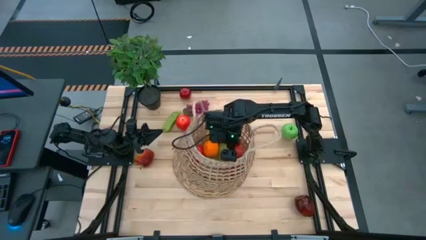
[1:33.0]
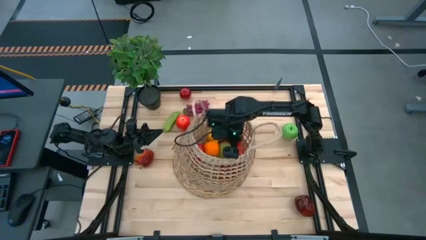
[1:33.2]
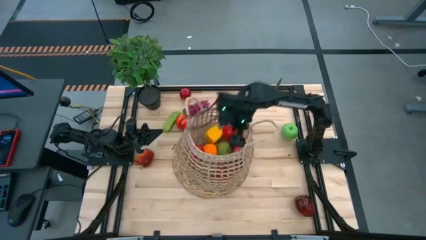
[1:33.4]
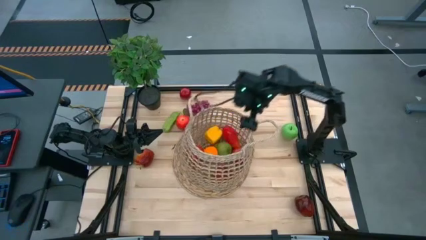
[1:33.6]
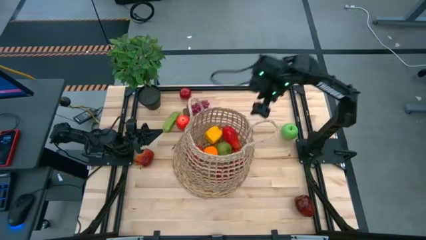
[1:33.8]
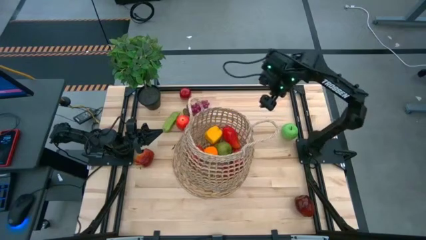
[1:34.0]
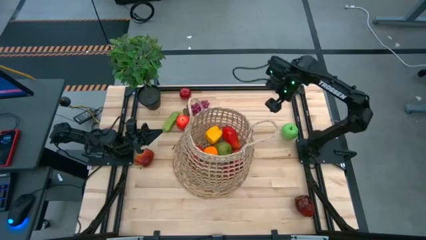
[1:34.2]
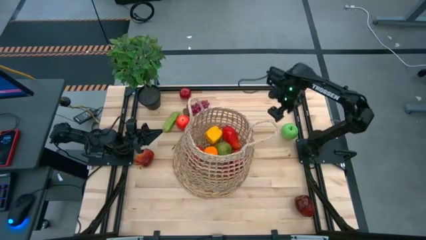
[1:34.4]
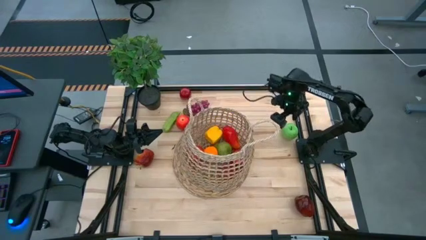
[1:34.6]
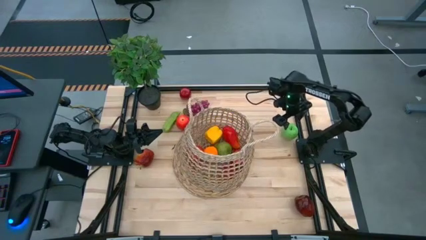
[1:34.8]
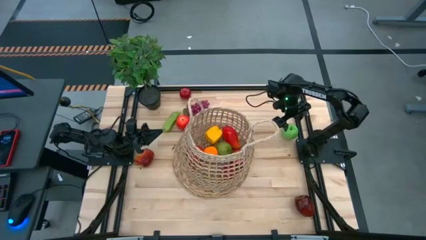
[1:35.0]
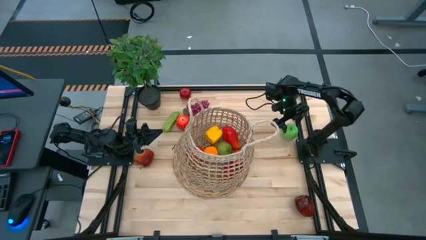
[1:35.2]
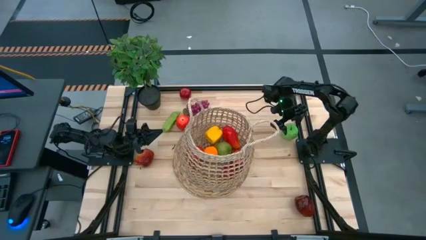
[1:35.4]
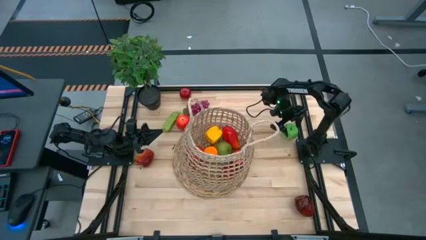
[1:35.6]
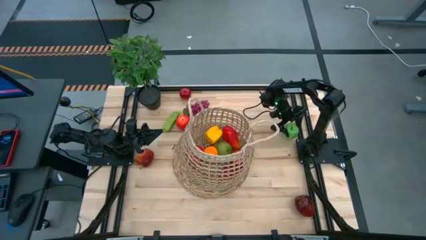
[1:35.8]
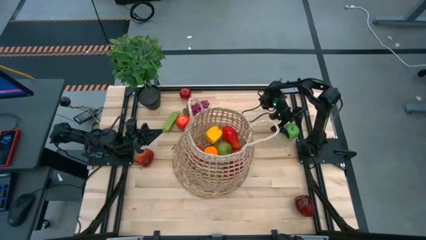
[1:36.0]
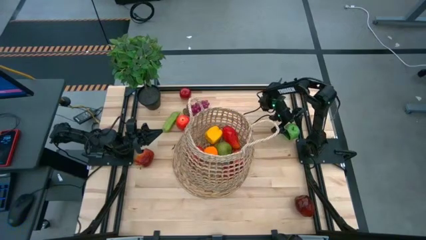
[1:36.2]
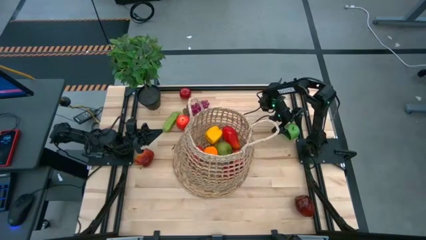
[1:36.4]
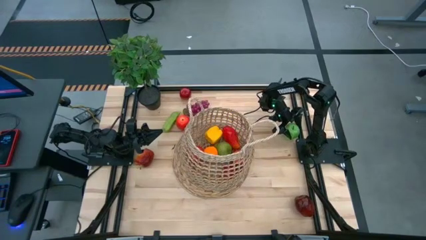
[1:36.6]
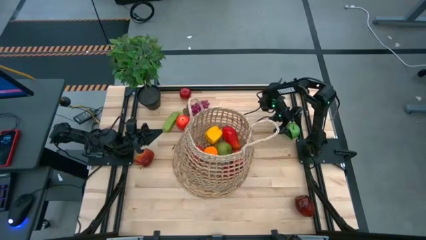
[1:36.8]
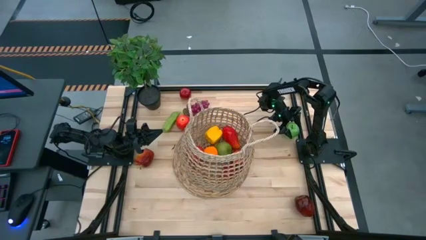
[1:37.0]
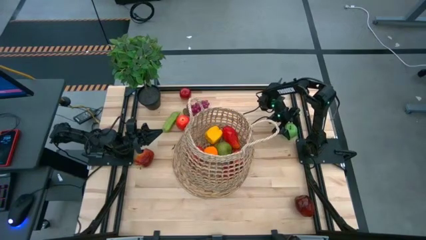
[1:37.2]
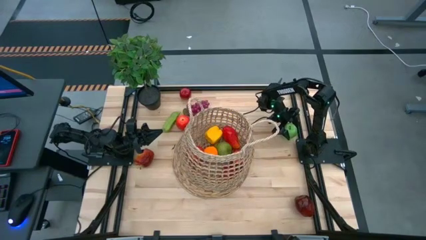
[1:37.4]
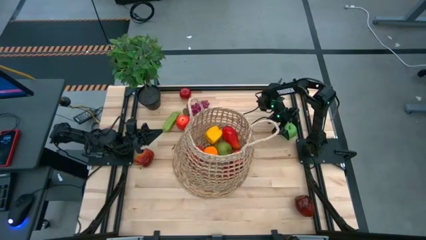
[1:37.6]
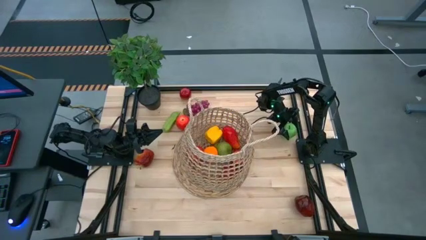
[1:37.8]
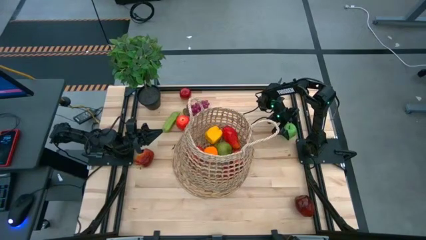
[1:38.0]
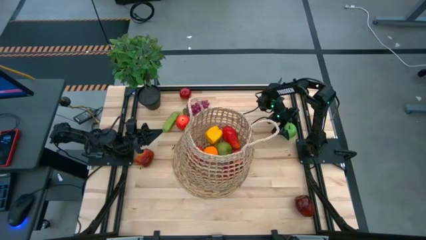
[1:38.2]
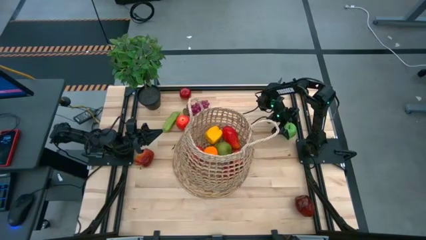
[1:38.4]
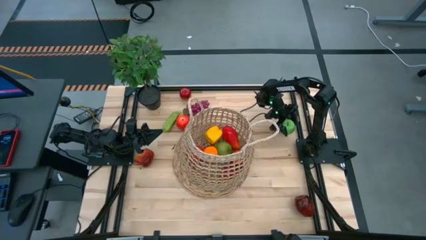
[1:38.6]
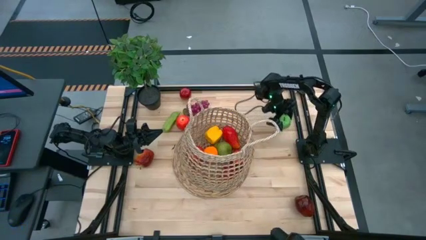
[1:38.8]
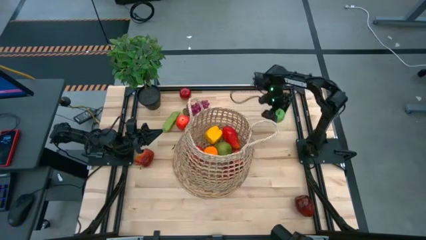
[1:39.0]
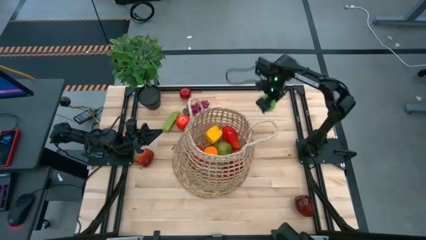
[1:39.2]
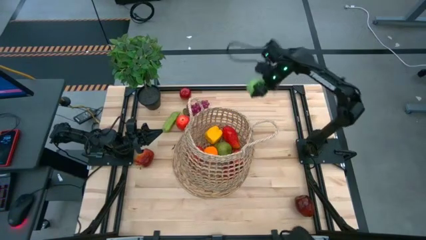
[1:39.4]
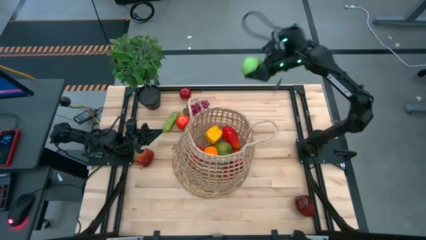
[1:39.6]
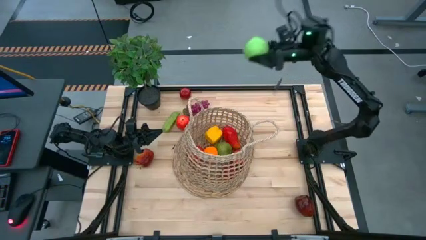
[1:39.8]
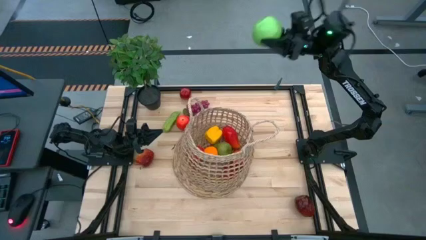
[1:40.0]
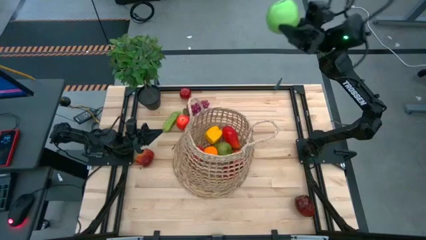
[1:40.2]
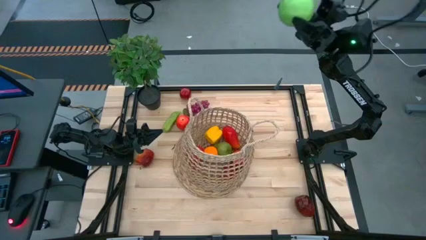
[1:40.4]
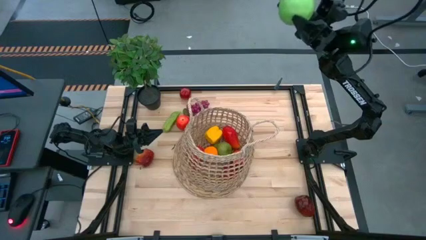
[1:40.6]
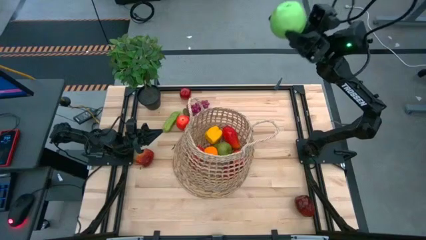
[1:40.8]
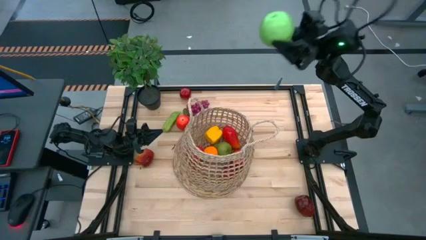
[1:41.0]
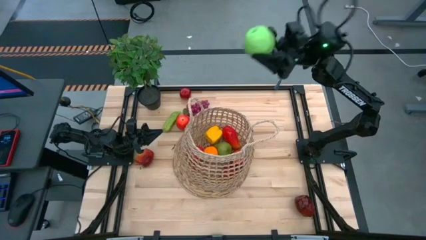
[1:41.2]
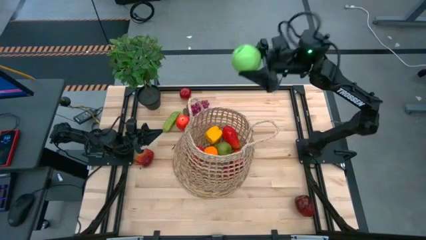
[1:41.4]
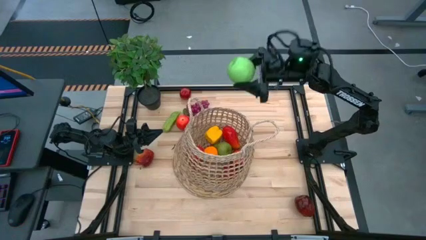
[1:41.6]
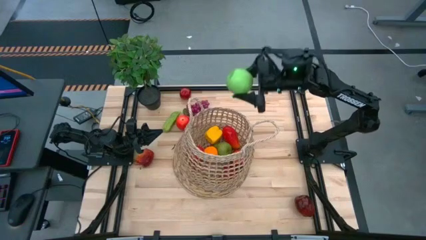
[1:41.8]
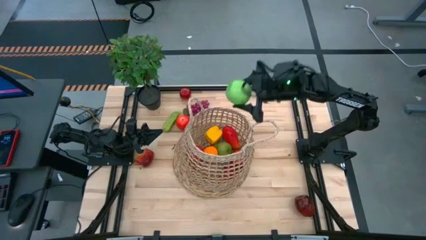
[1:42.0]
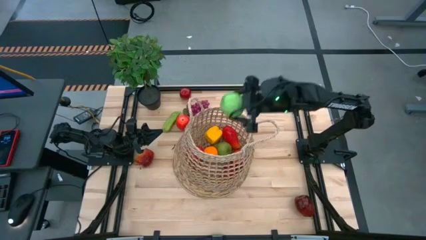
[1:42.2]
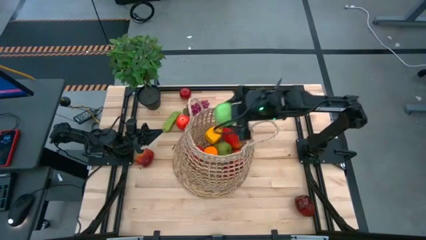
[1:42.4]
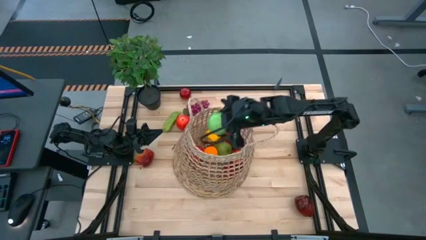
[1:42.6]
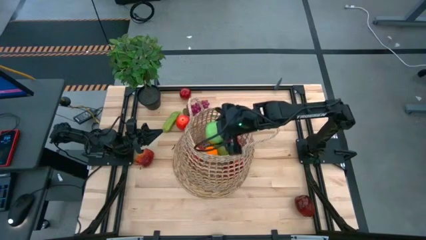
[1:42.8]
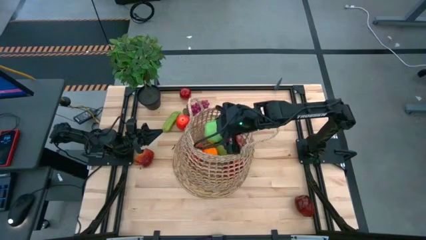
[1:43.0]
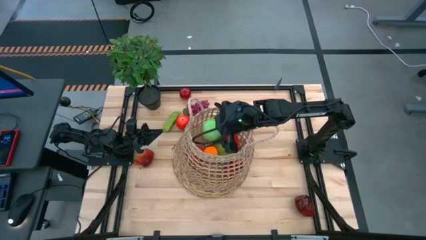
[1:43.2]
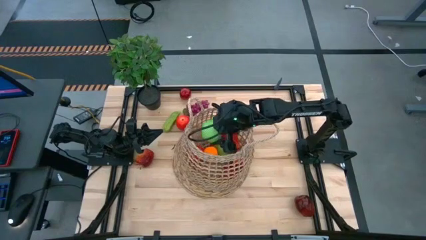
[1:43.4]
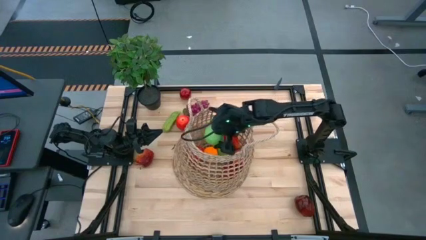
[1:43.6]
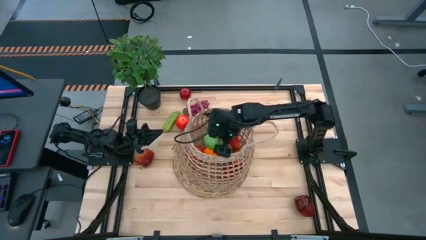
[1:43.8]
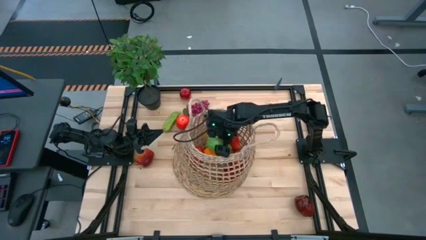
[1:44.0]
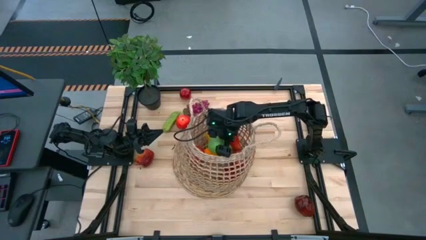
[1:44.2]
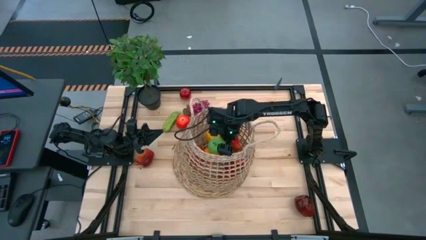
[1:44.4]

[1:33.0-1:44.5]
Task: Build produce basket
Put the green apple into the brown basket

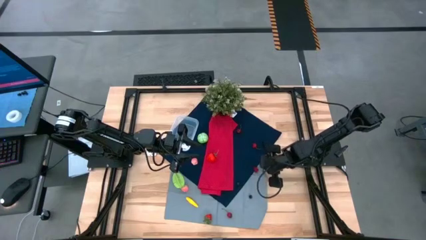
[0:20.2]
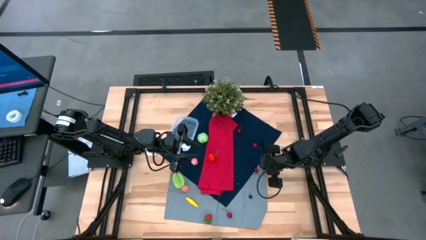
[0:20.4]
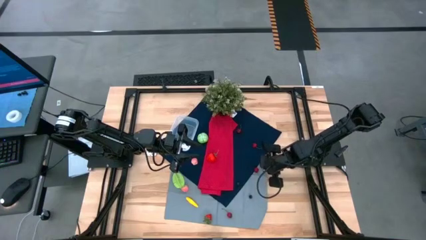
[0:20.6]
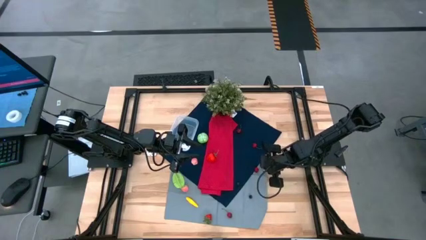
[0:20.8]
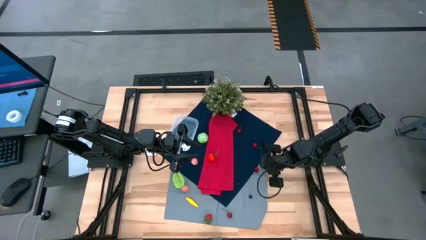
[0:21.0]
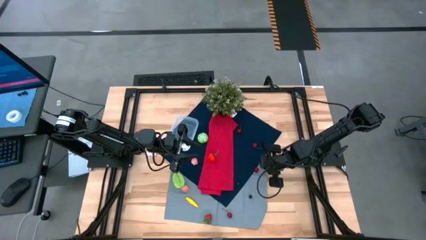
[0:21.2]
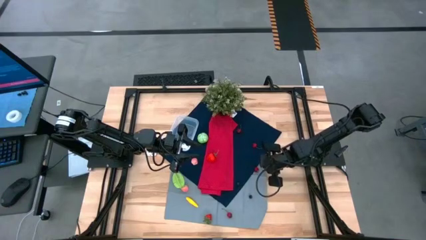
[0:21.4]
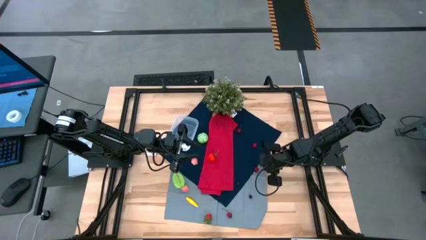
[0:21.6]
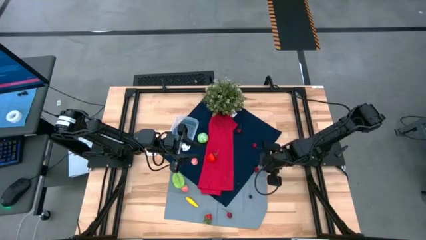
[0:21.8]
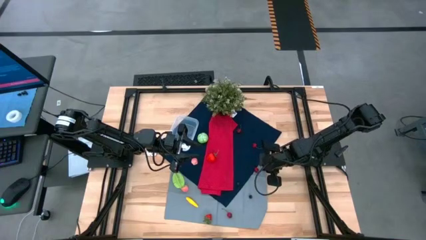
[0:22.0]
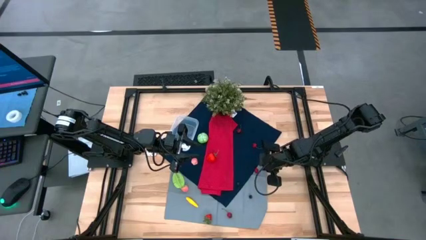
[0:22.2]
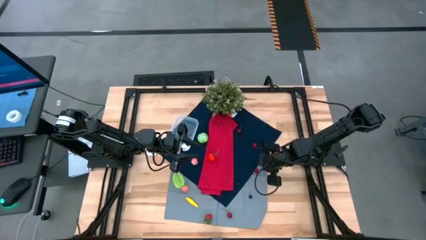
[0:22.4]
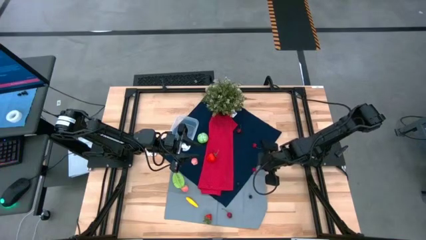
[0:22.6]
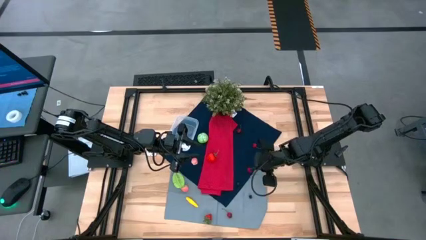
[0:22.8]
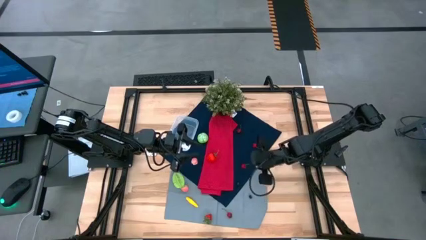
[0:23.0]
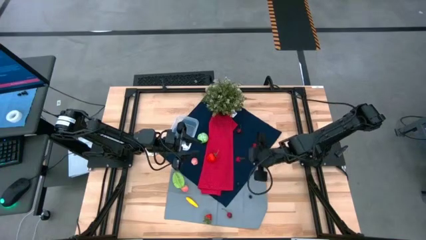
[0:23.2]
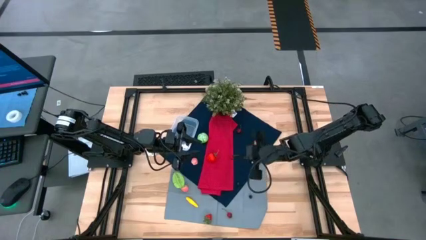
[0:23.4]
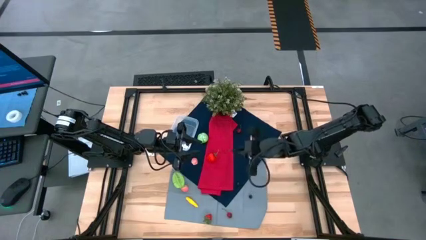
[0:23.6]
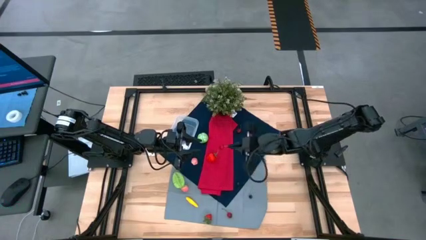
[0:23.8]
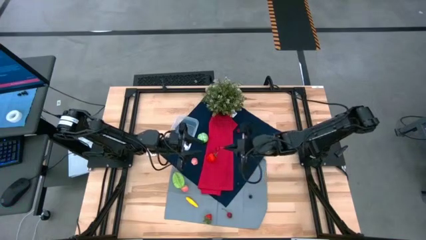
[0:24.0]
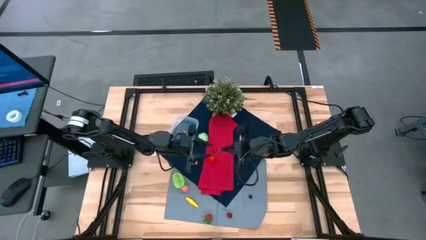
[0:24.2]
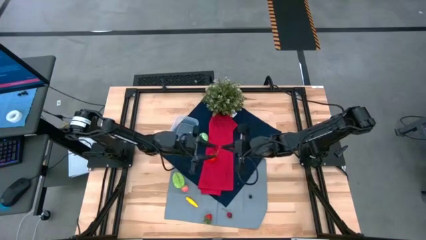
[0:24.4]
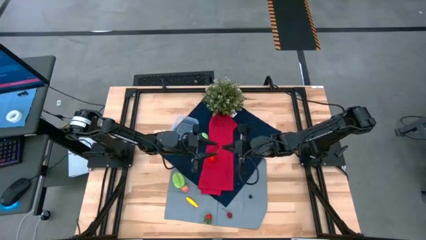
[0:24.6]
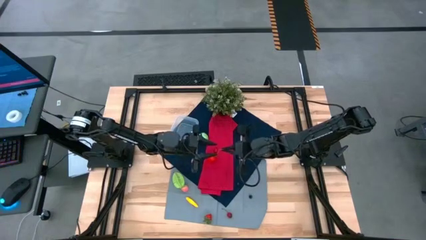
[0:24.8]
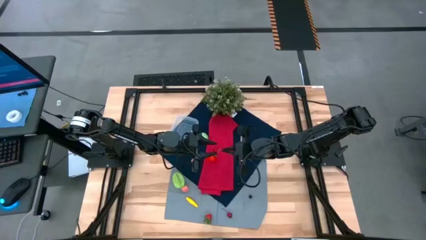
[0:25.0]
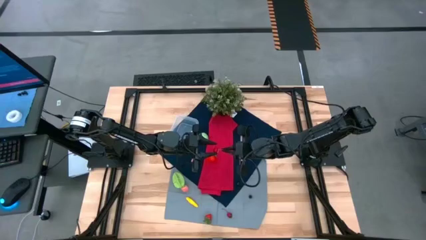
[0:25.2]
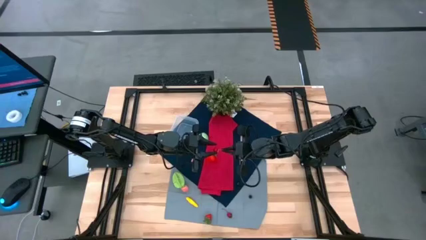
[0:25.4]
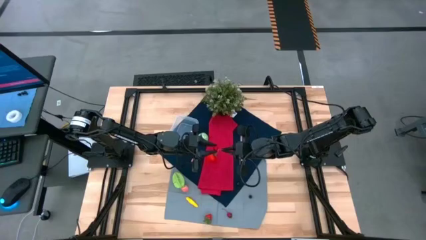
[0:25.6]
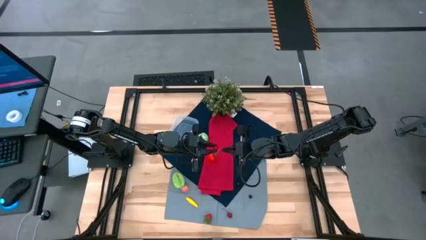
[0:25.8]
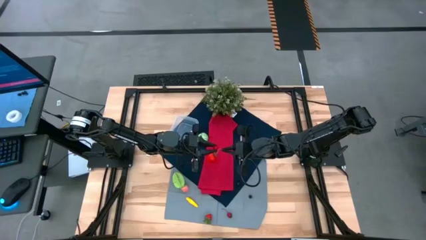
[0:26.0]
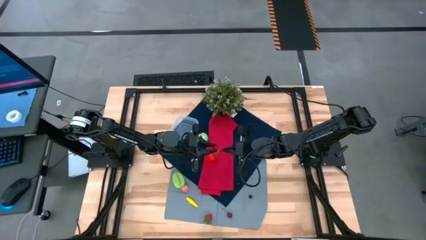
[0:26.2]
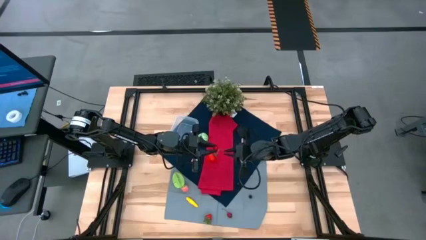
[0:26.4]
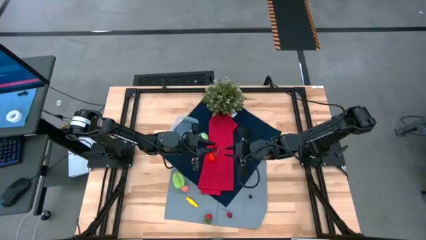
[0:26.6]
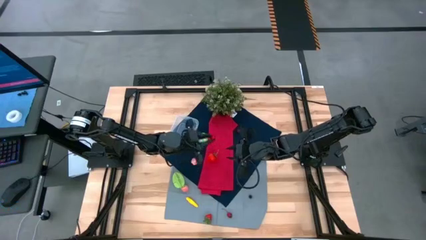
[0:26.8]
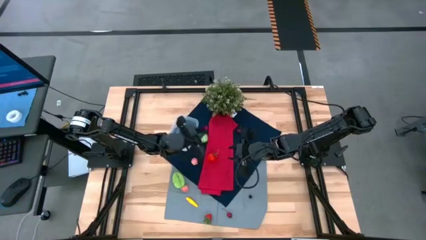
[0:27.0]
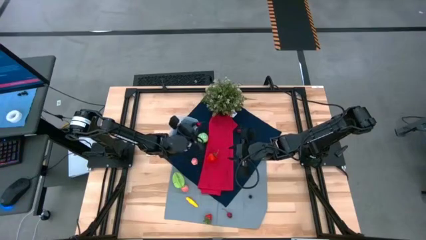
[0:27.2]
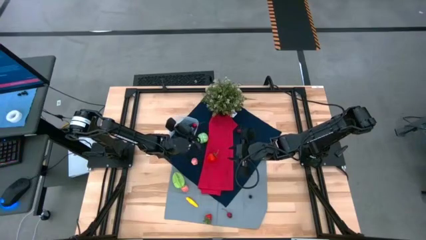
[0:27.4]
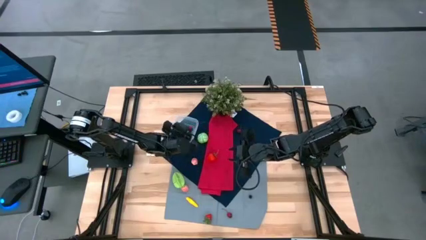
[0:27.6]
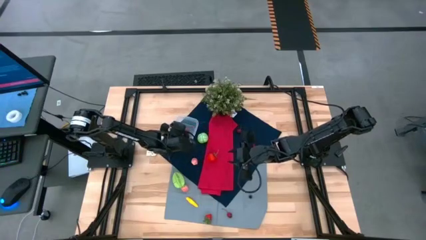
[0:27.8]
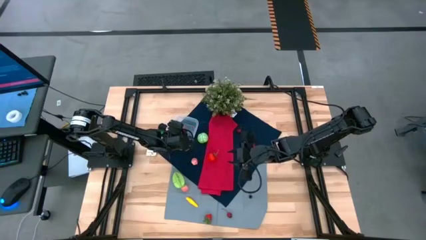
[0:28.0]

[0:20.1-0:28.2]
Task: Pick and placing Produce into tupperware
Put the red cherry into the transparent bin
